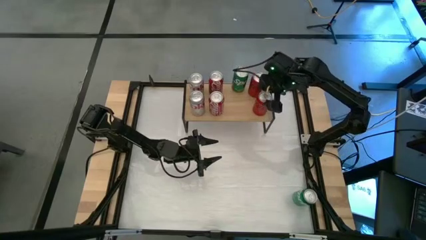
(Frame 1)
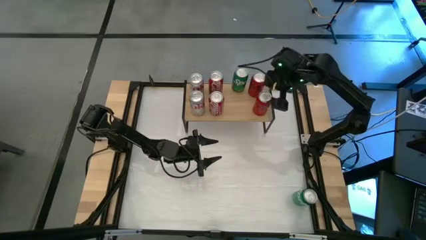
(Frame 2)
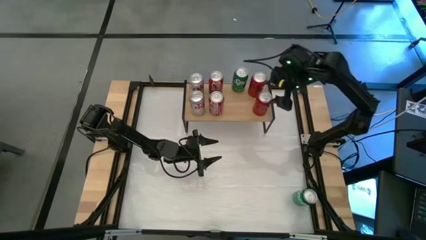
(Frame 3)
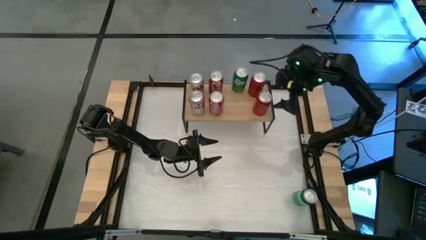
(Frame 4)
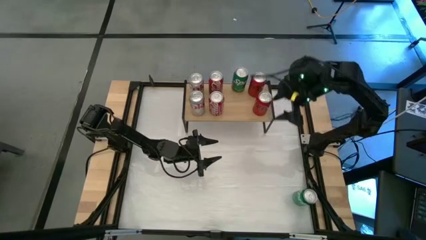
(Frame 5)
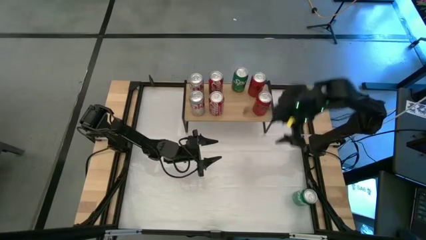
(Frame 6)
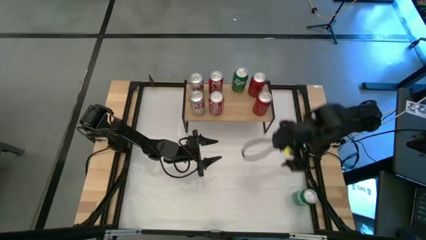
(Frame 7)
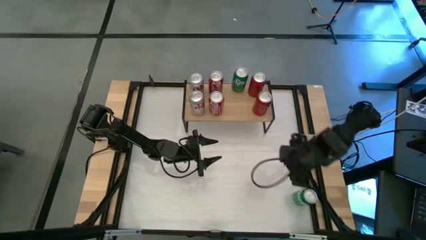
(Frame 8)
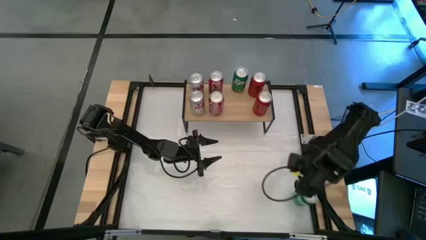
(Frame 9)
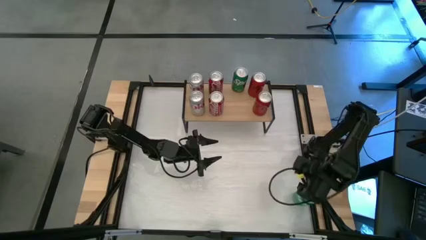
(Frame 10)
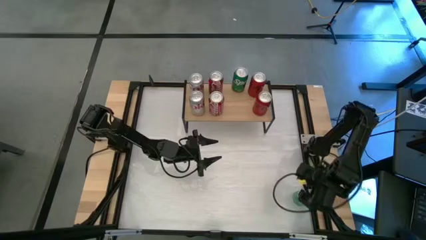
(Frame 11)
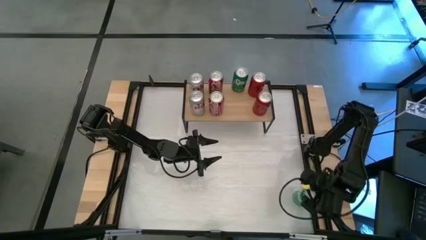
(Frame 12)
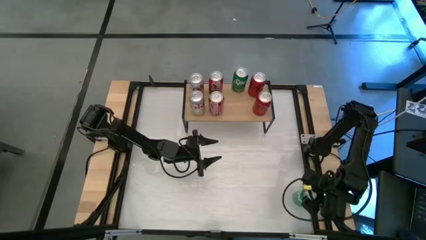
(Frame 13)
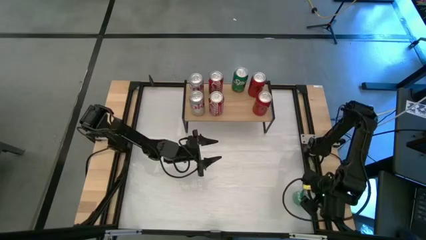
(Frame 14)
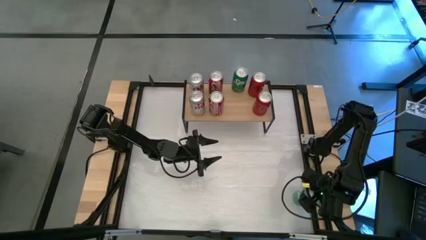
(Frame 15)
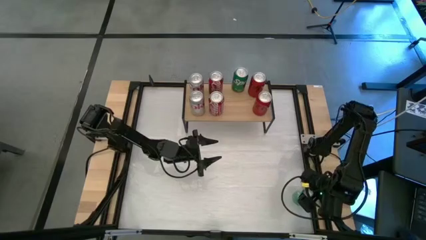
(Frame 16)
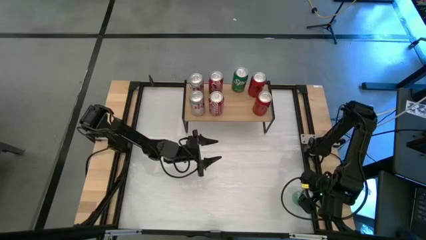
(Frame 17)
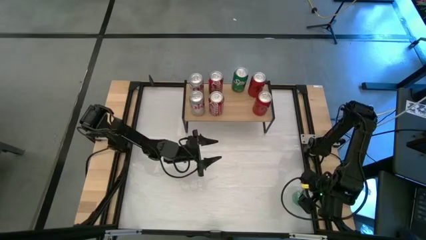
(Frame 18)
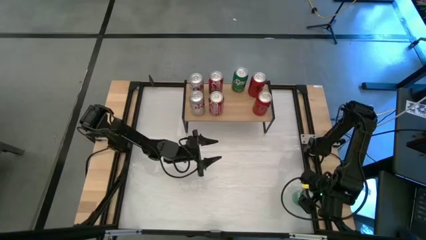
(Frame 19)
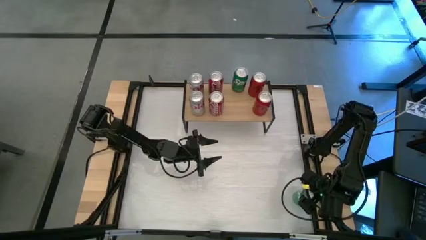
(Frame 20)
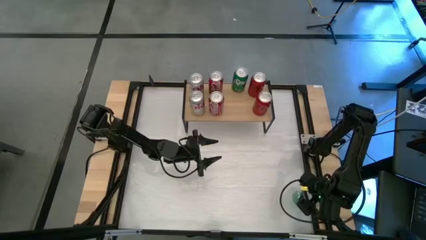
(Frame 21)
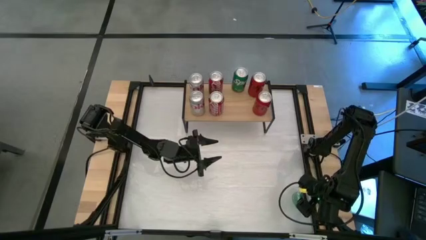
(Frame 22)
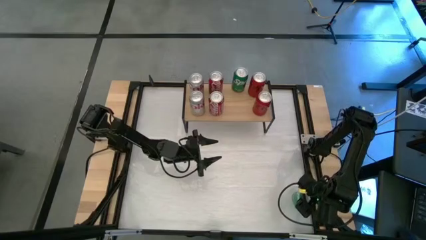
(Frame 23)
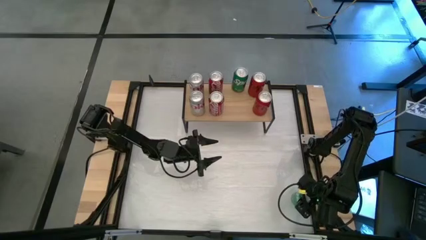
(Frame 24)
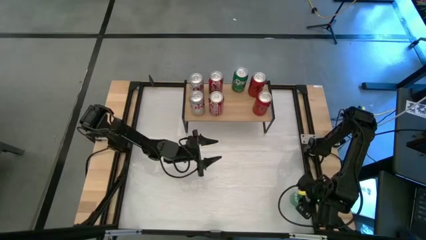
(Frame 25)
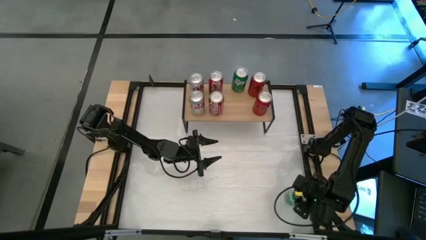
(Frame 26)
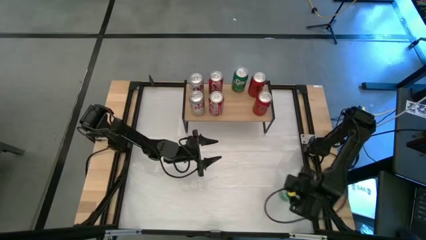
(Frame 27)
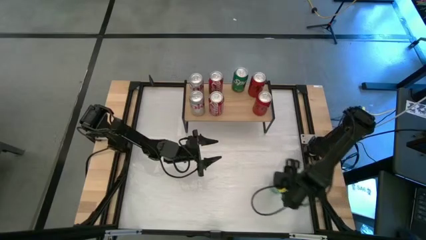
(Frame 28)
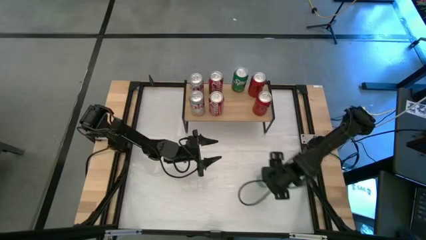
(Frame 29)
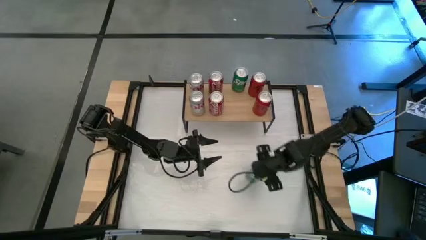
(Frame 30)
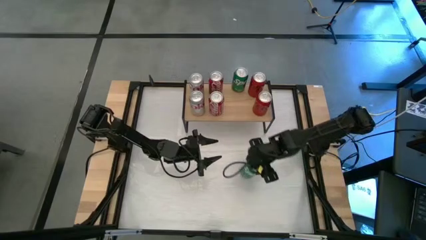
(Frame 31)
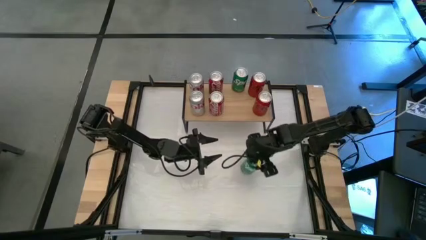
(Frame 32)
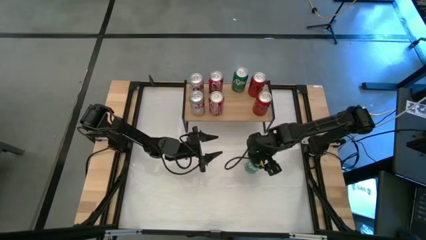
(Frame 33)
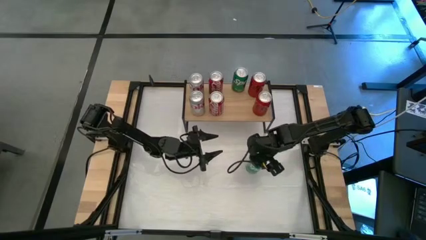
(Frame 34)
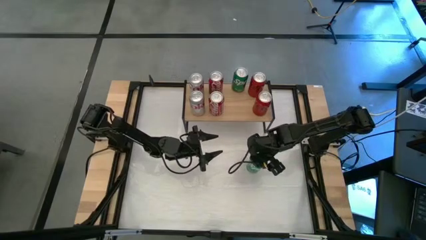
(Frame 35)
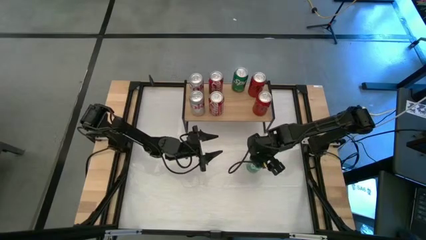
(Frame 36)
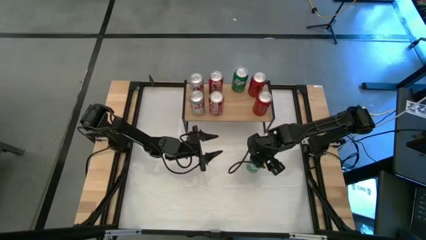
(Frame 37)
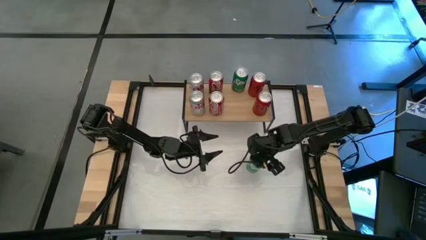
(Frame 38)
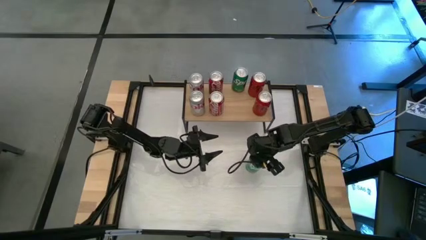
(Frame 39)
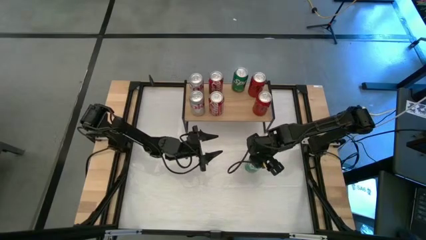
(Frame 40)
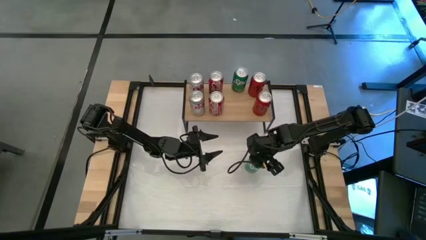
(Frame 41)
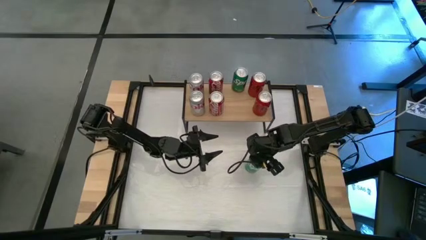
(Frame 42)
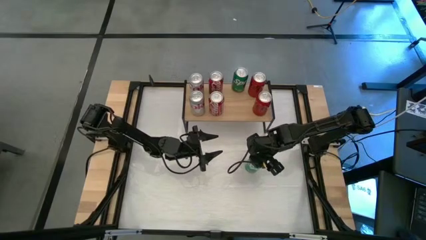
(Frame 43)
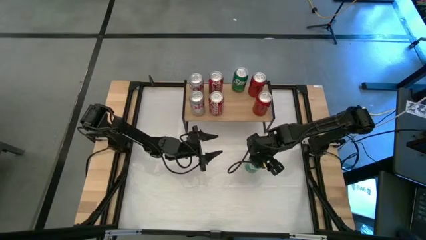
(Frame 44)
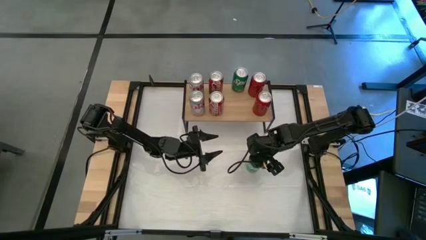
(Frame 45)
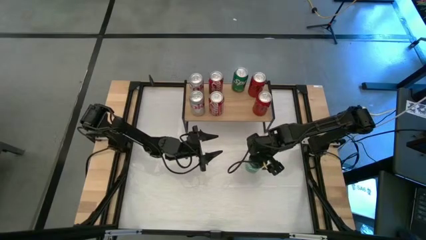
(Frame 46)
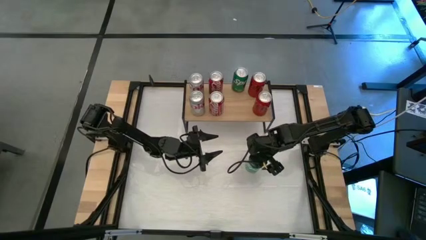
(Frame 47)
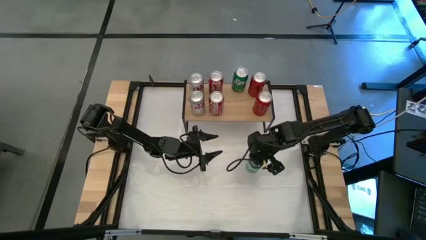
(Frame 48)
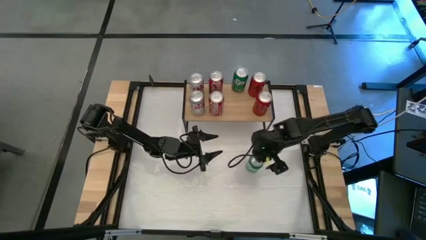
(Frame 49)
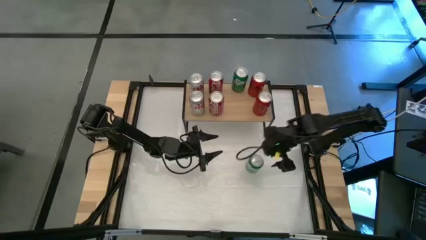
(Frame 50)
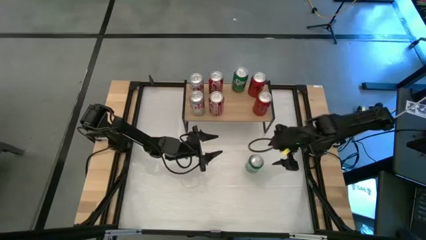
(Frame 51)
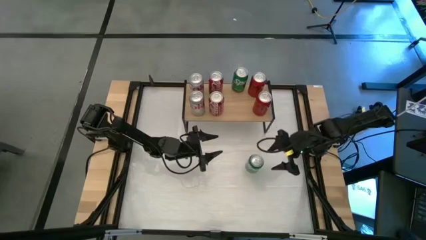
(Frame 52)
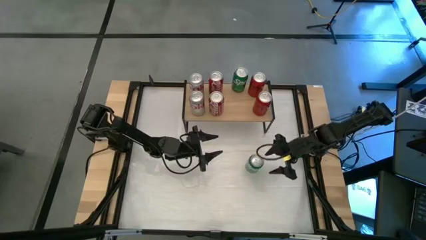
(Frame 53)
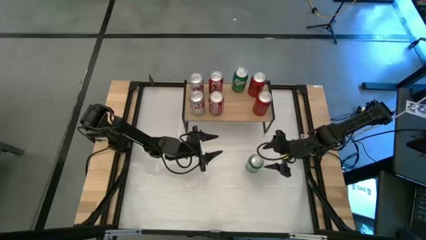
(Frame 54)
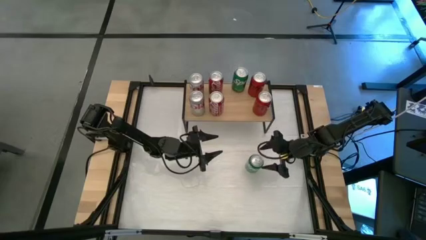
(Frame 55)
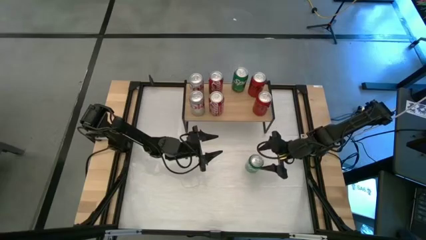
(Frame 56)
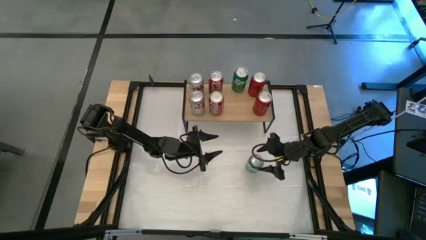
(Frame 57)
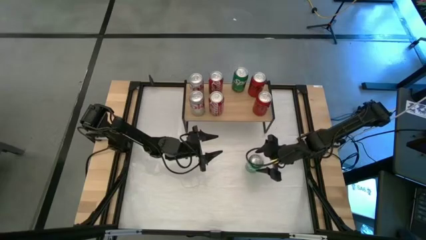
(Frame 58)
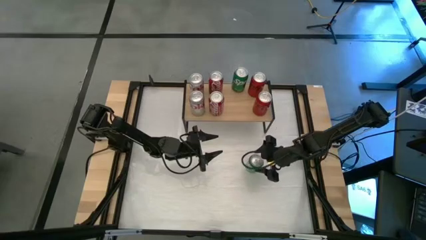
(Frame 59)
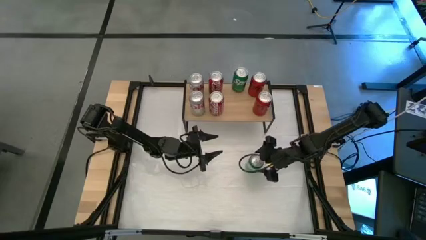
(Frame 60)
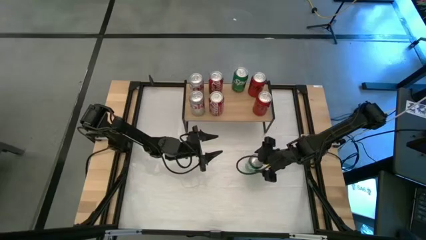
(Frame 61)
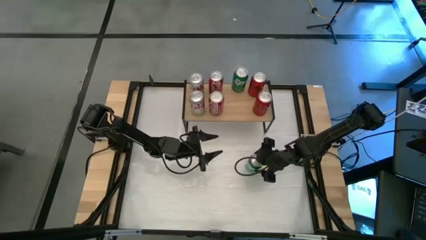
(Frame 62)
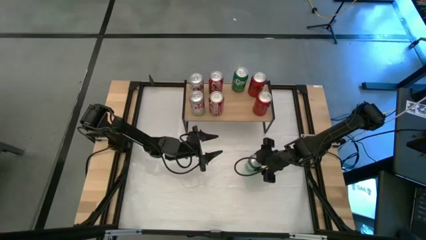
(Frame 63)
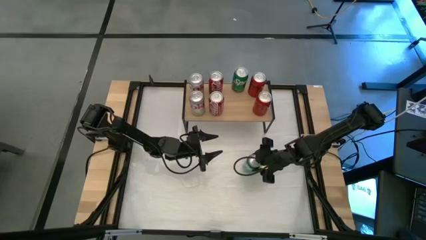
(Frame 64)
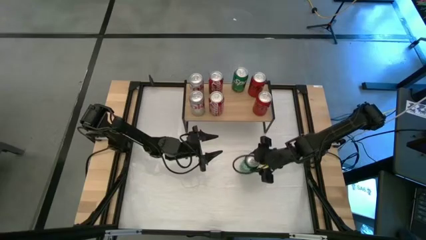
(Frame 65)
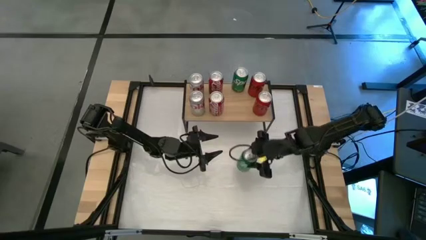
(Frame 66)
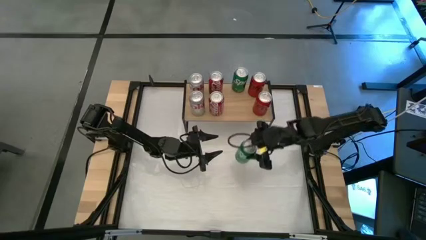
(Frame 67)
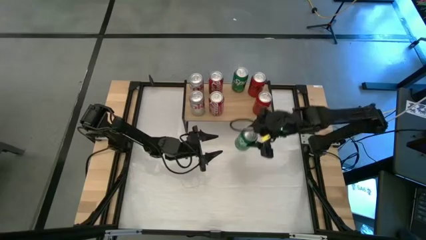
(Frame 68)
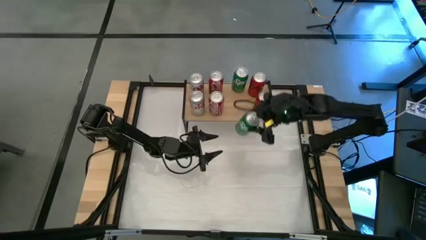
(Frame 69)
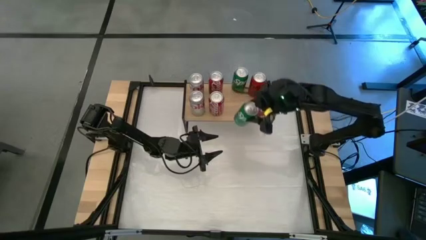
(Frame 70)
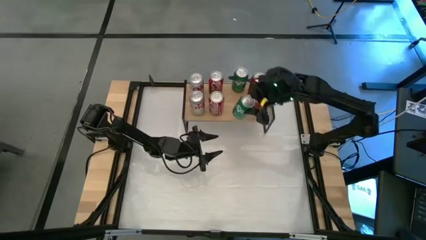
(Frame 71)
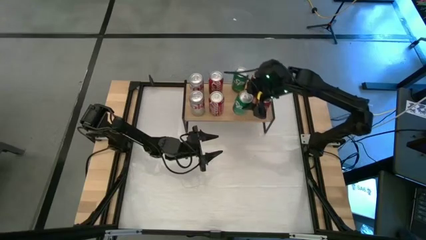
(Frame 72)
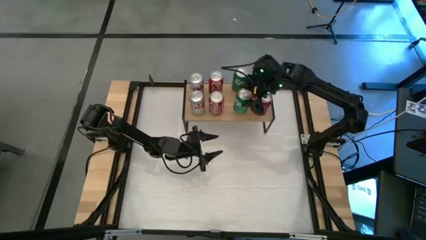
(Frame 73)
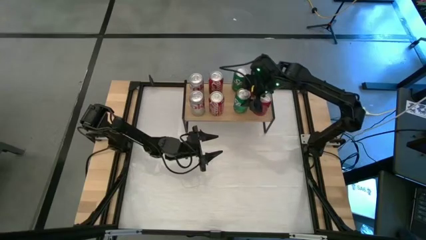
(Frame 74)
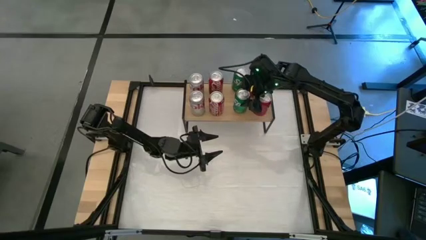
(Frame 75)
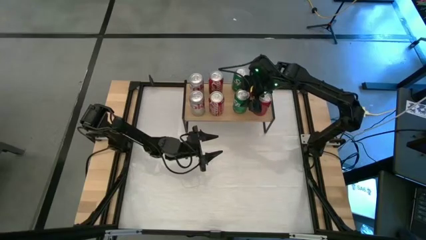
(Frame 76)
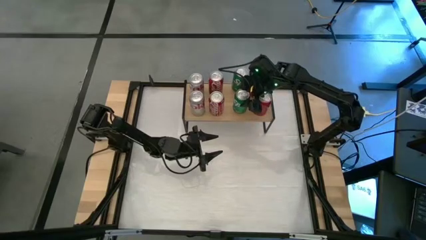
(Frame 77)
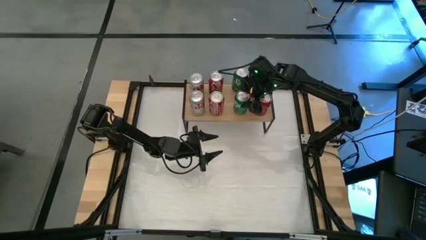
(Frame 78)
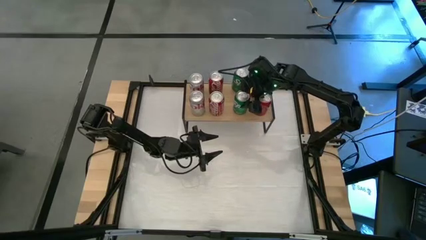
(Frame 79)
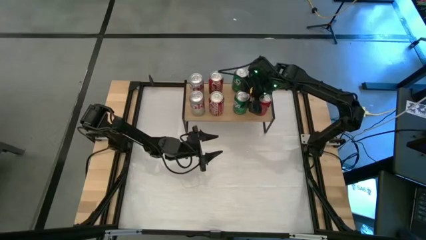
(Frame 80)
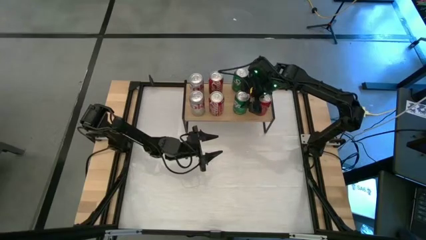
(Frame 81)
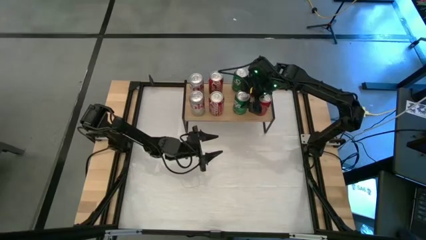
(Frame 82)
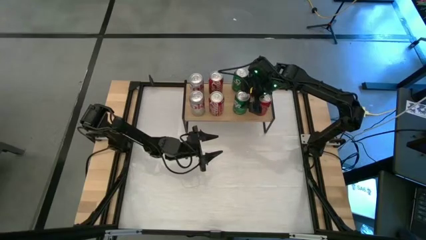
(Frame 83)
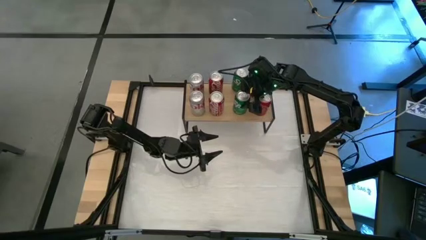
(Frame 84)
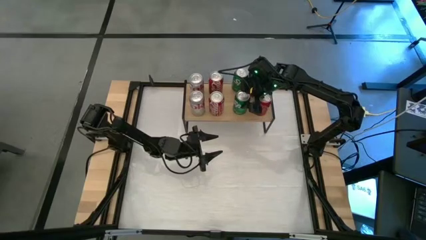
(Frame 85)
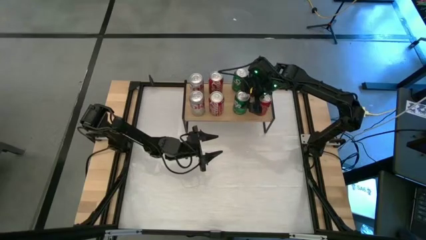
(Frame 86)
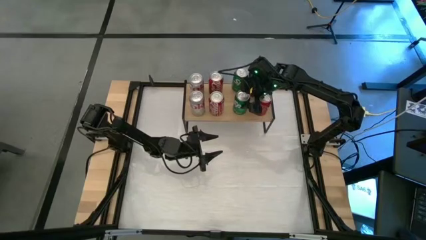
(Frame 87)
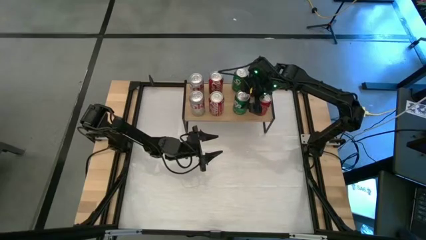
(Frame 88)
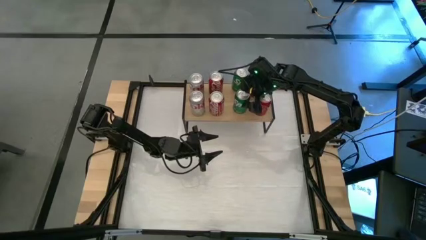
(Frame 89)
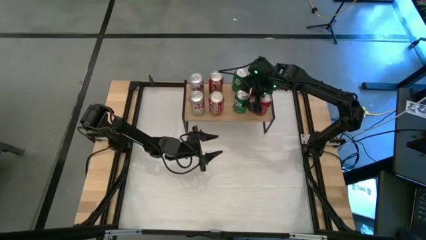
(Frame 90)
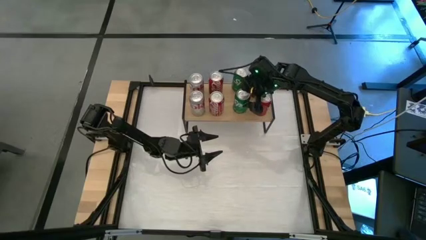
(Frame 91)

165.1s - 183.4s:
Task: Place canned beverage on shelf
Put the green soda can aligned with the other green soda can on the shelf

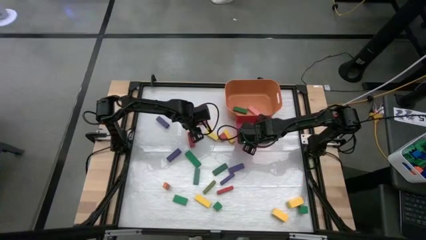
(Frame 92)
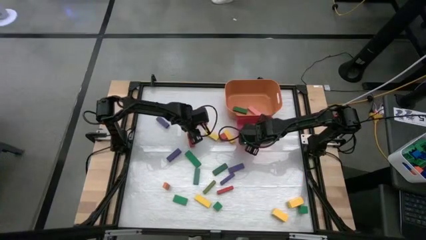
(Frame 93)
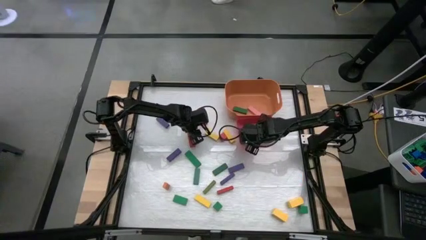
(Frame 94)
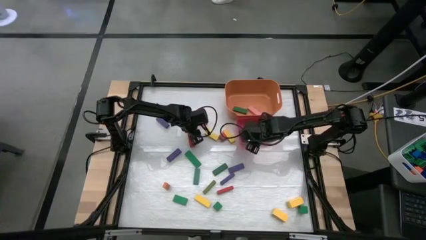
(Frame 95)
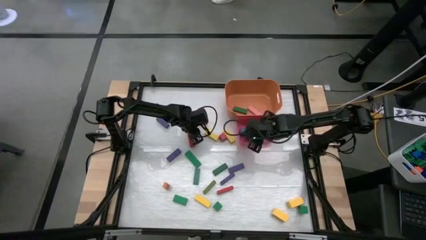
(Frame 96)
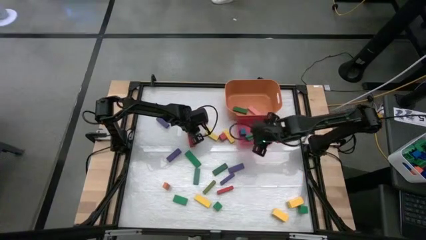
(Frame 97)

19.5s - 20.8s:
Task: Sort blocks by size
Put the red square block into the red bin
